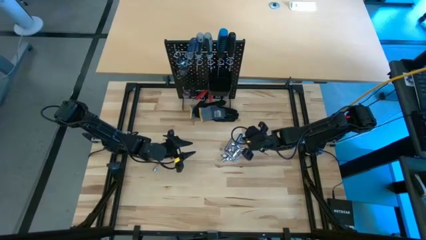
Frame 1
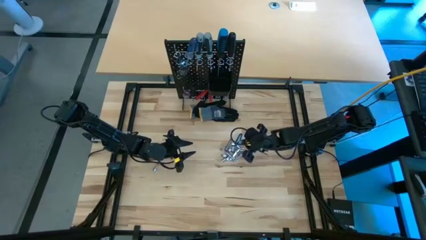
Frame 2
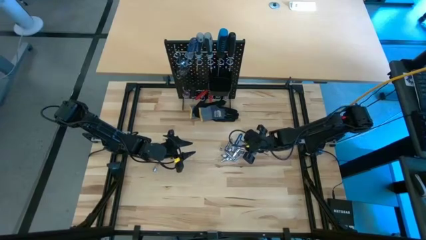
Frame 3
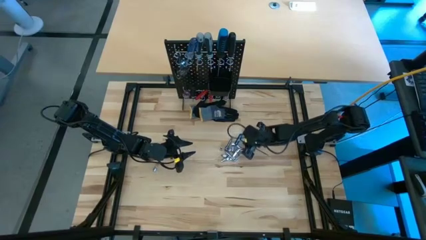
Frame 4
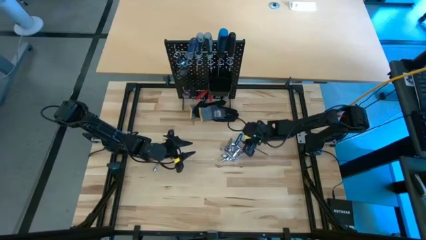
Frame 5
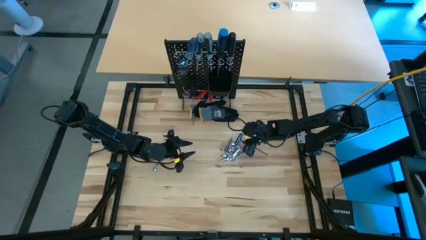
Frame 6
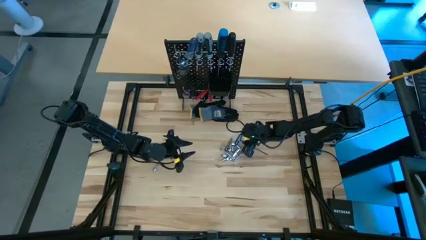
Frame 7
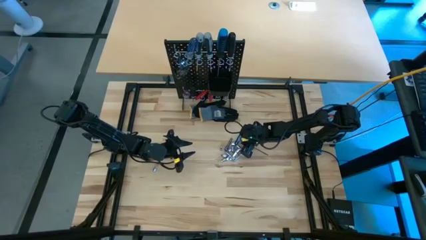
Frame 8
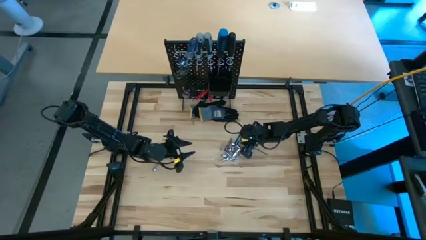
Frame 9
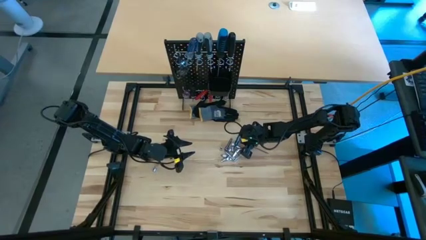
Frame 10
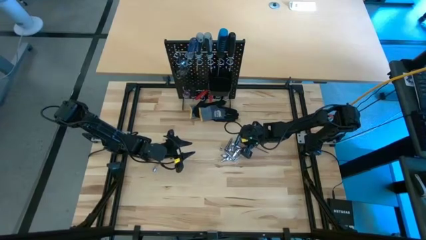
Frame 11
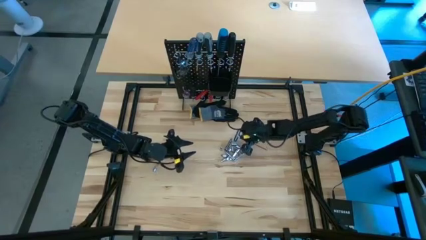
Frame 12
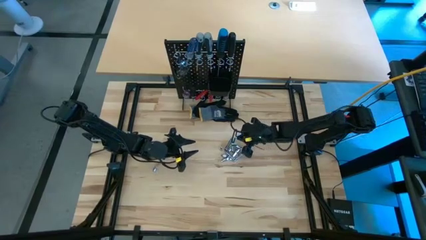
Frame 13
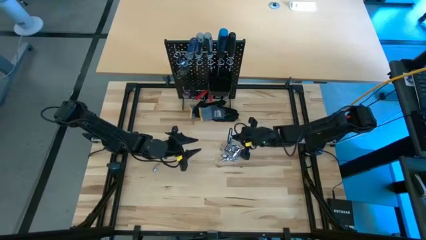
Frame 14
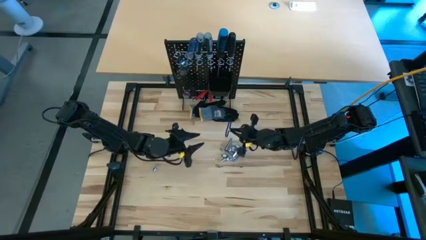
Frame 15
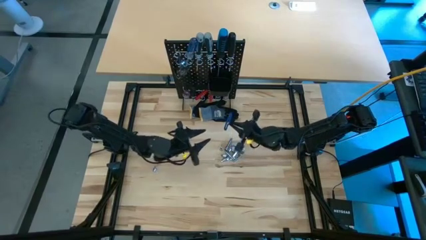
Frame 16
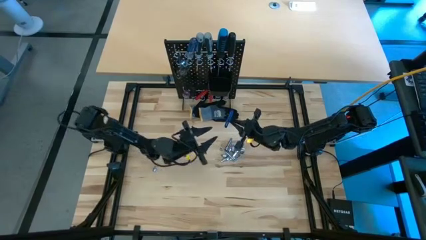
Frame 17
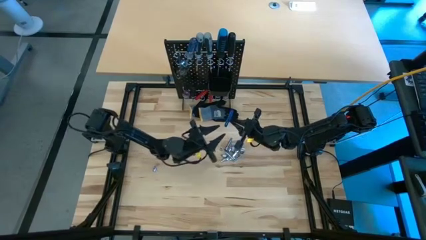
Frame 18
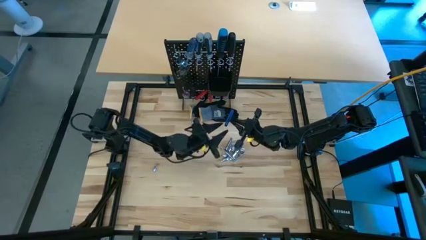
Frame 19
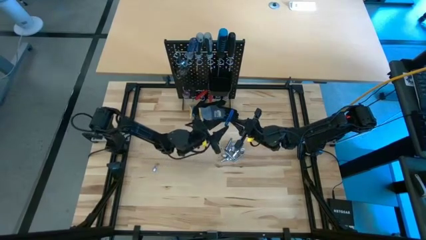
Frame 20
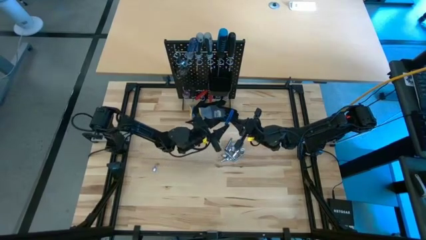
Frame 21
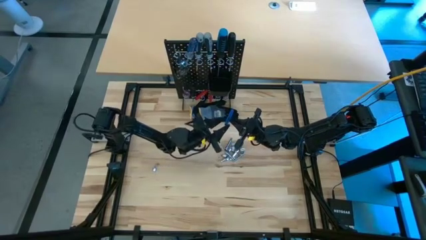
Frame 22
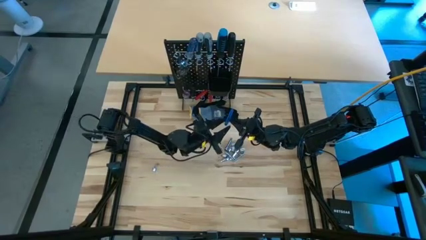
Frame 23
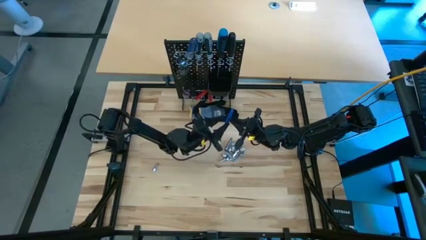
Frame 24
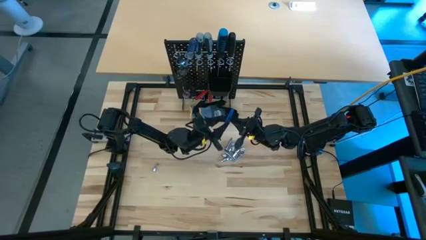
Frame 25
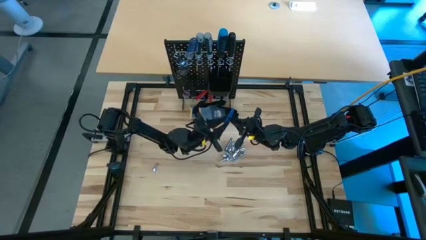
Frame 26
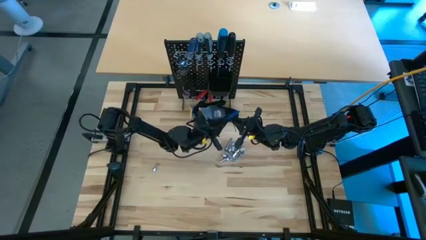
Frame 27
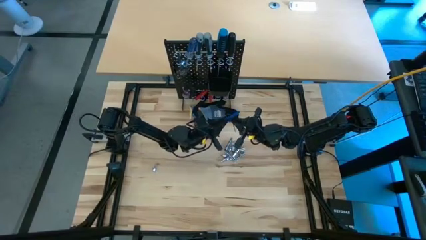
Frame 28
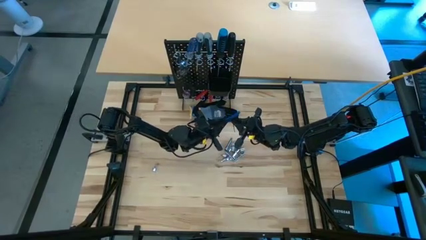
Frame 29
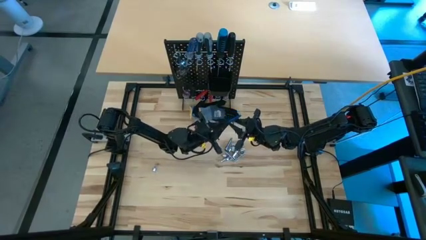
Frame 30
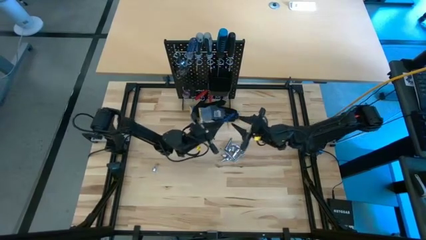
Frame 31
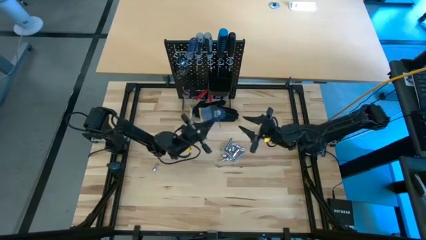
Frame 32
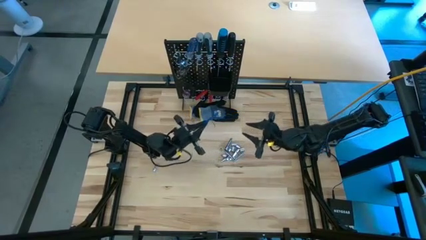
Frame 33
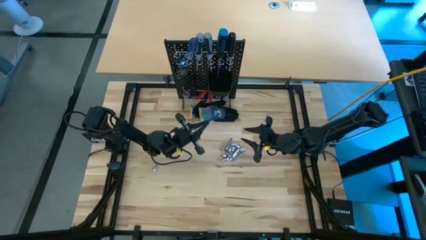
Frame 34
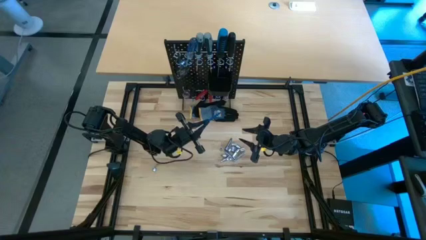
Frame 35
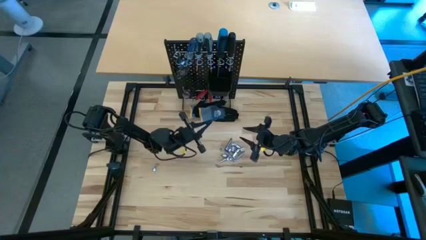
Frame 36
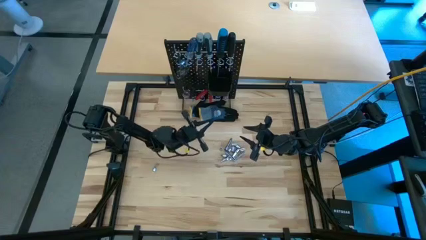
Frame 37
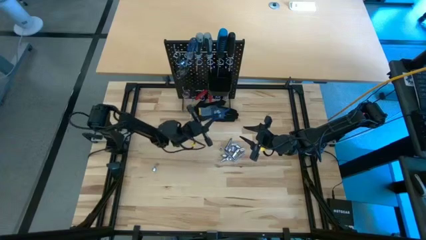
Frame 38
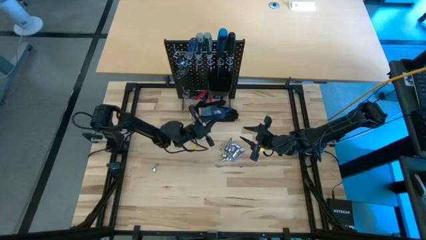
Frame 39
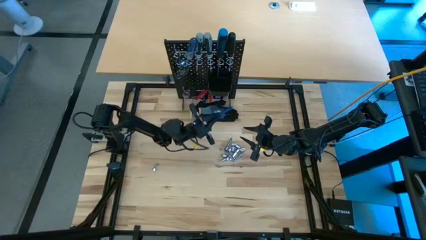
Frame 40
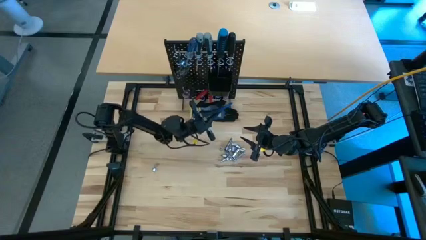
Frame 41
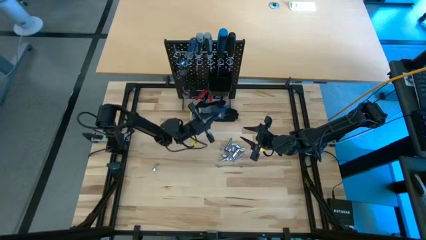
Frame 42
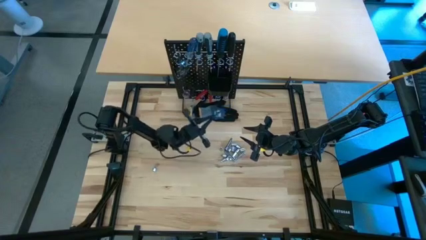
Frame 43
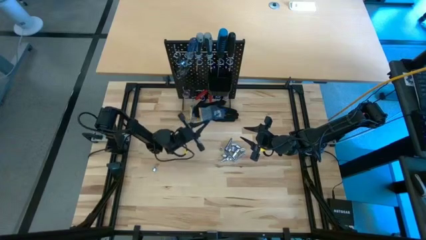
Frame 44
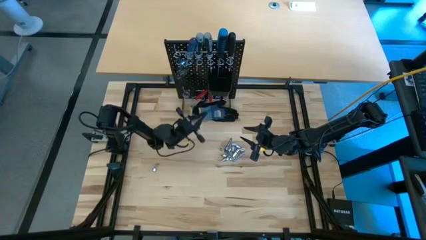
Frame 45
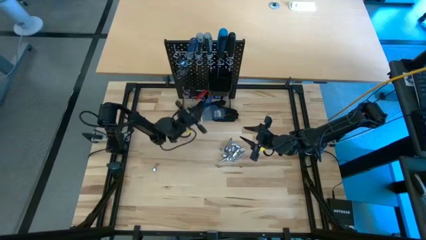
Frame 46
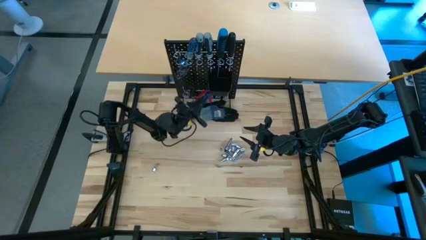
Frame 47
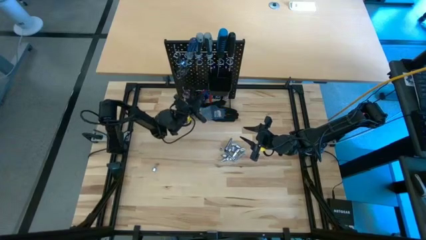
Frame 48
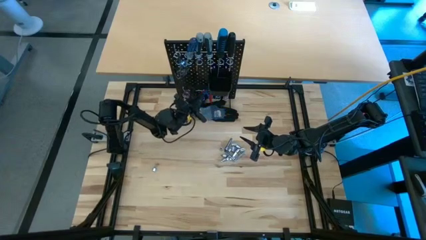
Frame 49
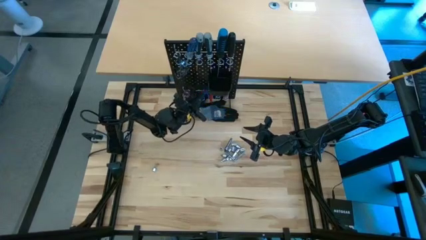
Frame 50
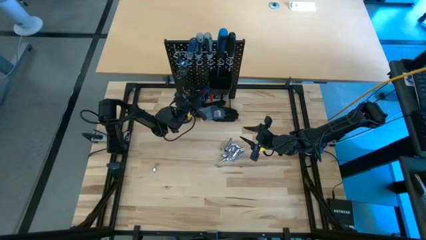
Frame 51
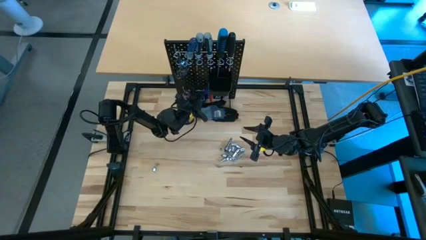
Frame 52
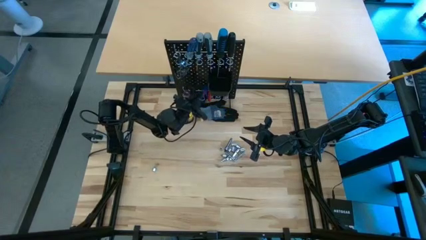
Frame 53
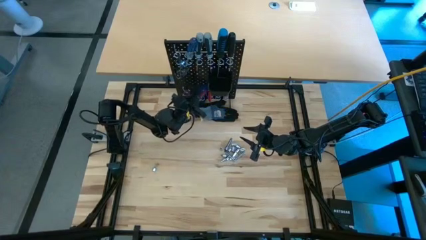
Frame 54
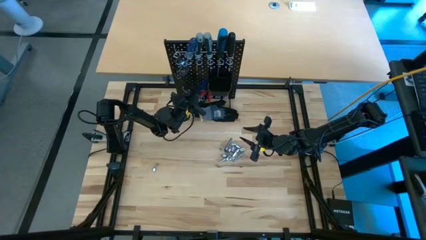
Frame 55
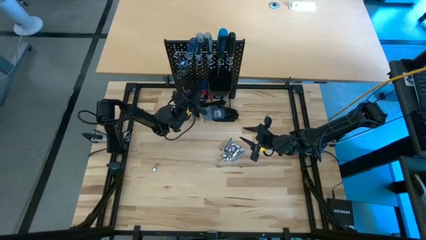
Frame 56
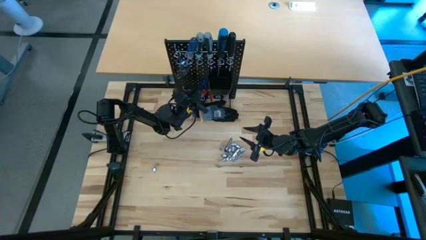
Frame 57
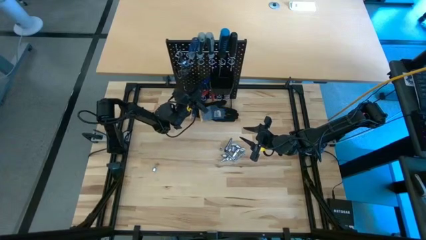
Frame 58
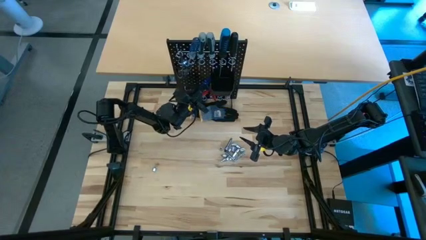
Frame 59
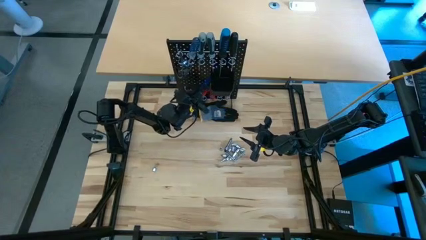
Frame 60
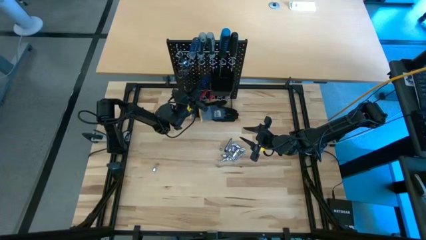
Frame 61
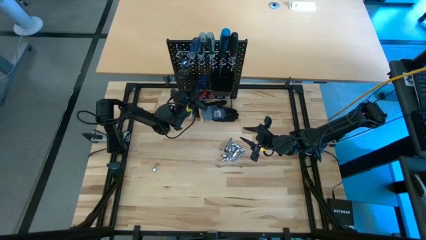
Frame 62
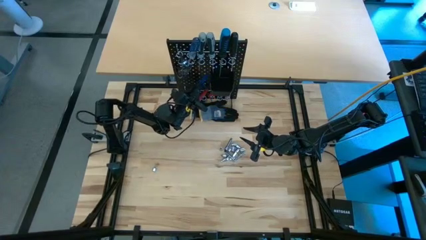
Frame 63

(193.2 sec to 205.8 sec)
Task: Hang tools onto peg board
Hang the blue pick tool on the pegboard

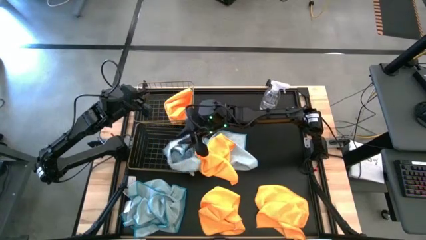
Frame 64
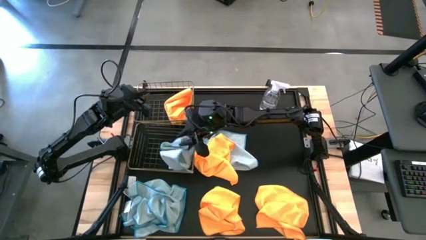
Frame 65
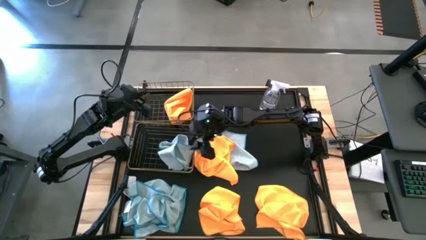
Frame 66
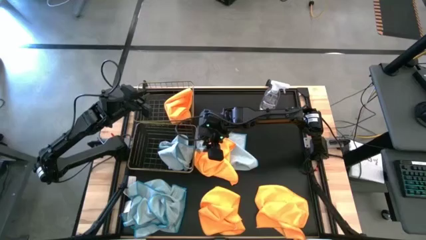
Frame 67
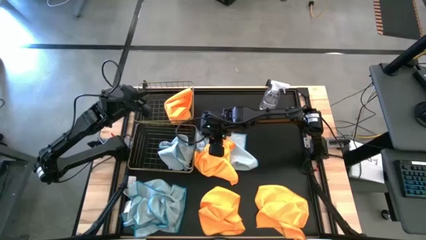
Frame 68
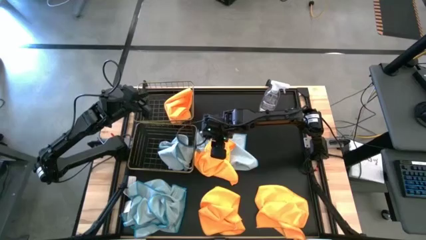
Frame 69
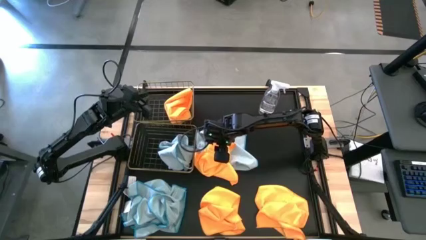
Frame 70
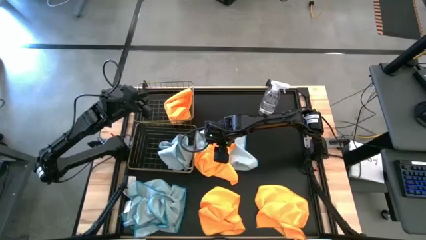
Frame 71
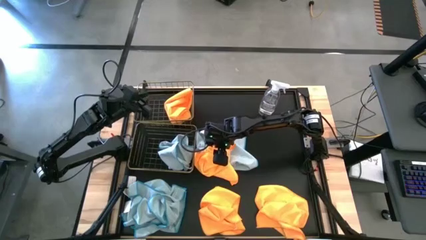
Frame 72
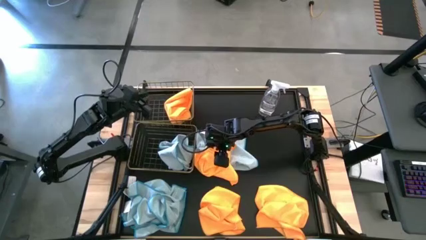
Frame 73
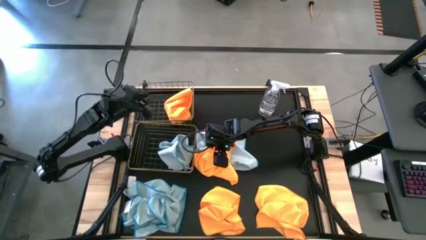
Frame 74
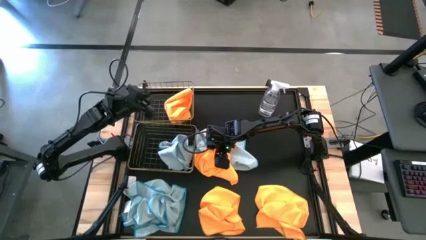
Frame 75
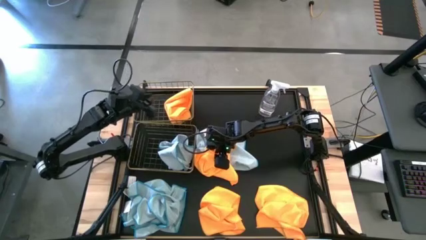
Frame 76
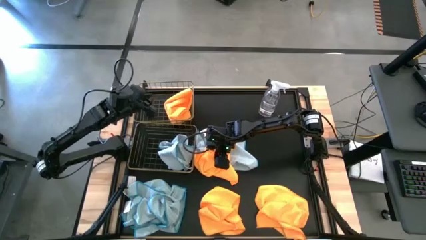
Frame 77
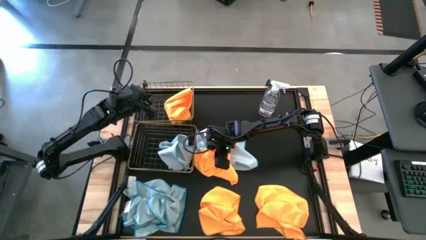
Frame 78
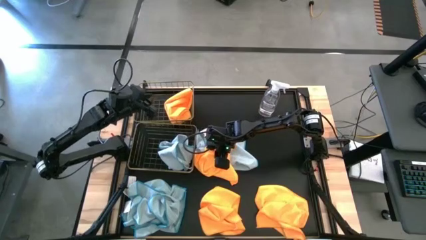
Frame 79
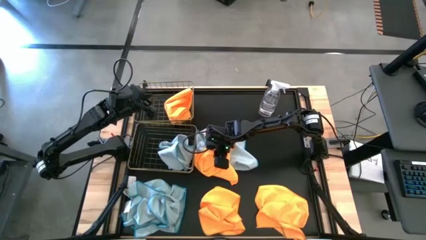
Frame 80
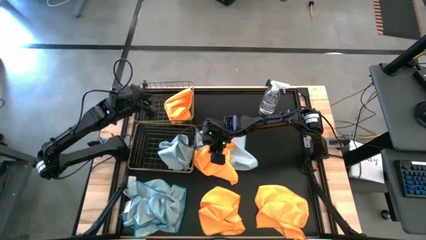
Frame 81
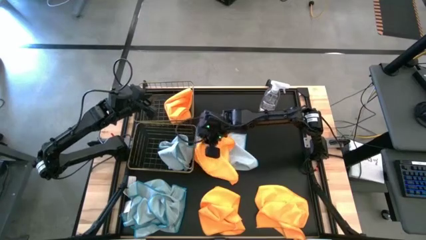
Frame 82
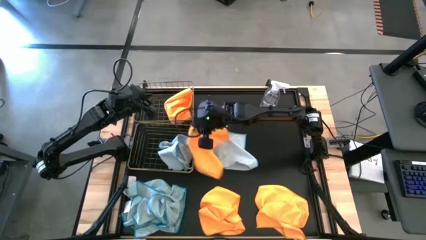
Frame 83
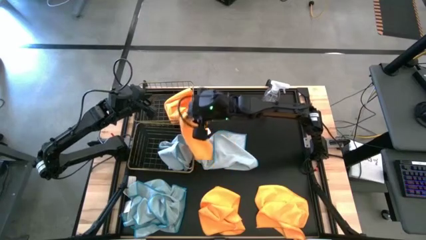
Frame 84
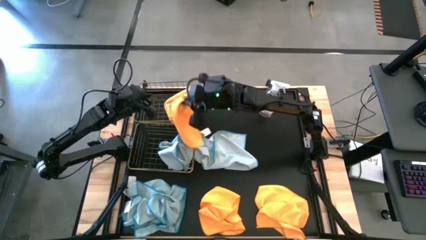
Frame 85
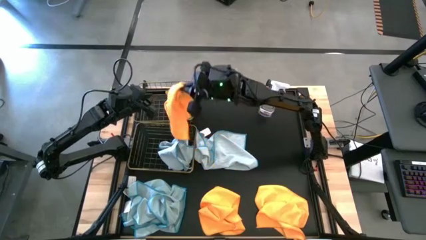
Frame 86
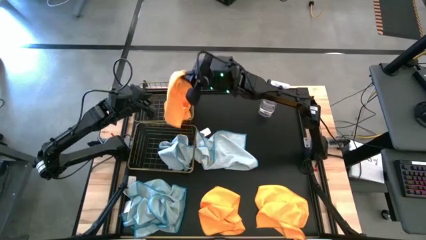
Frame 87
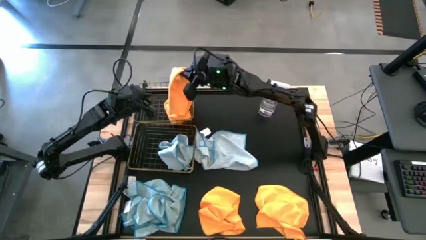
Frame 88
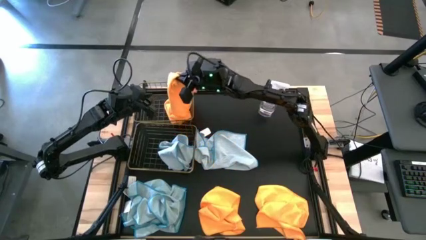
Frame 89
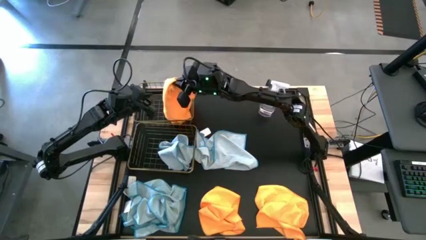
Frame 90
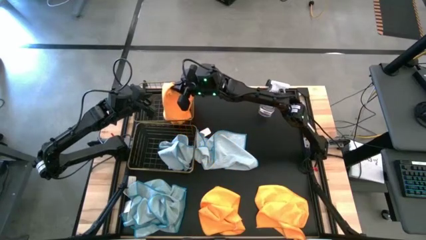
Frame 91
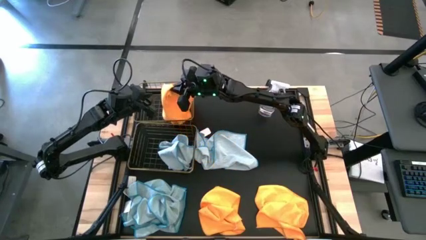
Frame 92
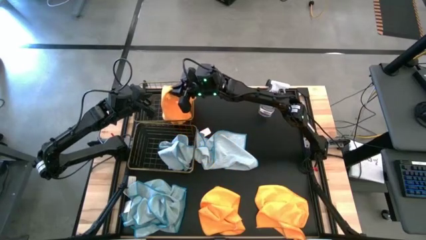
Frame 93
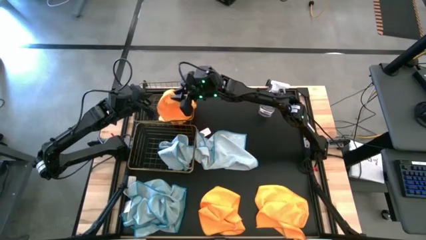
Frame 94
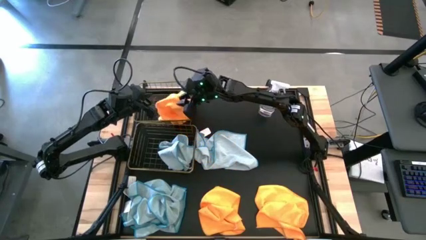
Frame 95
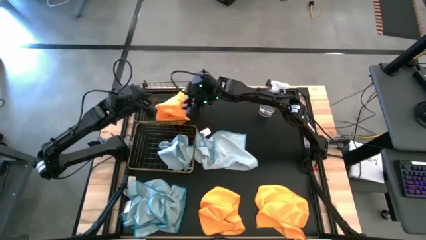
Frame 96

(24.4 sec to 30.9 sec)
Task: Sort microfiber towel by color & place in baskets
Put the yellow towel into the top wire basket
